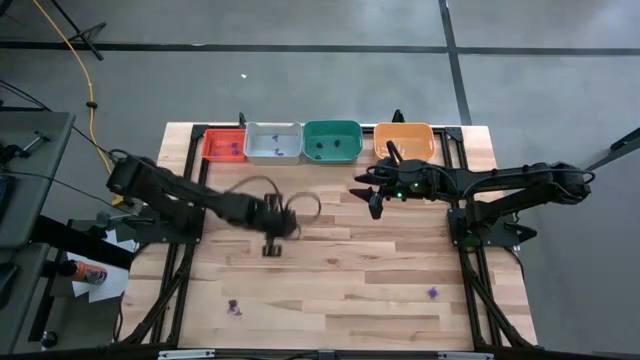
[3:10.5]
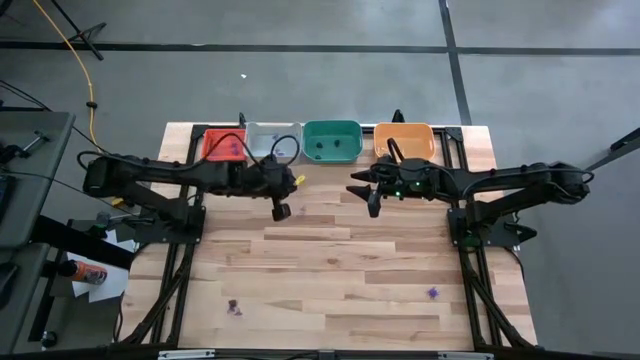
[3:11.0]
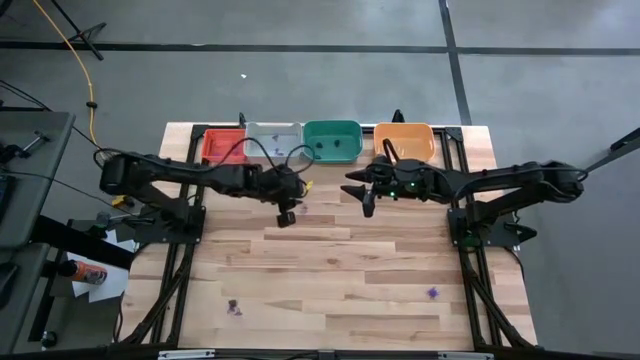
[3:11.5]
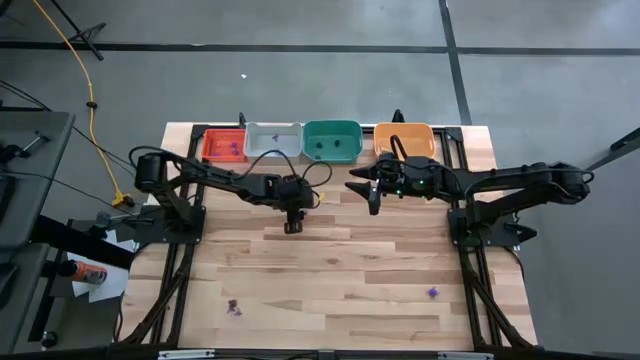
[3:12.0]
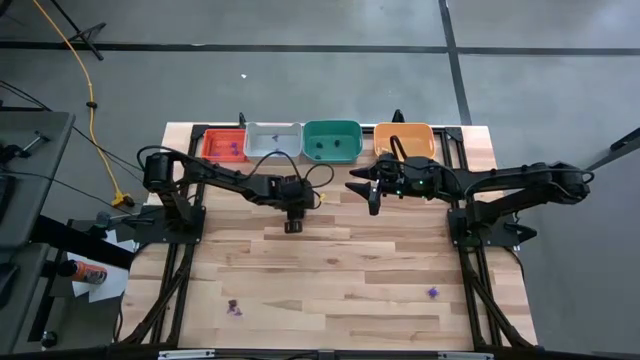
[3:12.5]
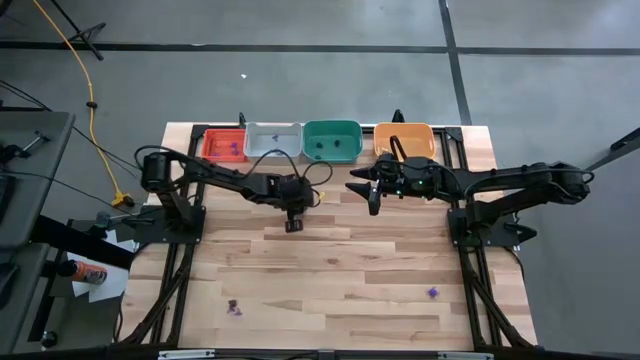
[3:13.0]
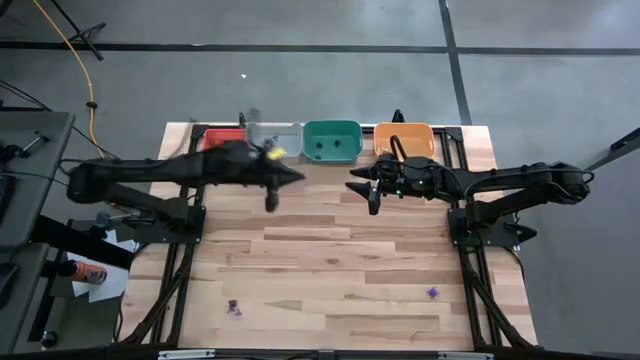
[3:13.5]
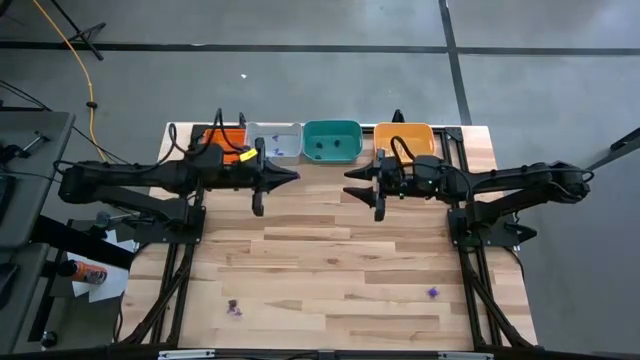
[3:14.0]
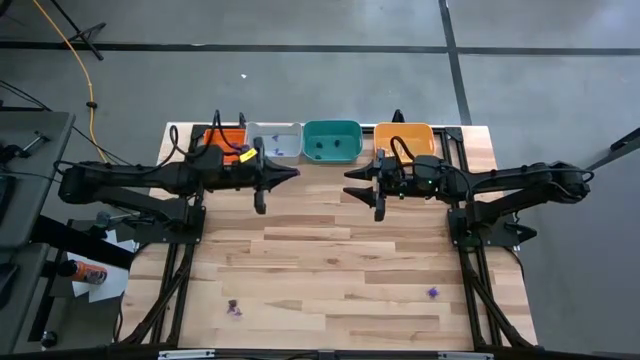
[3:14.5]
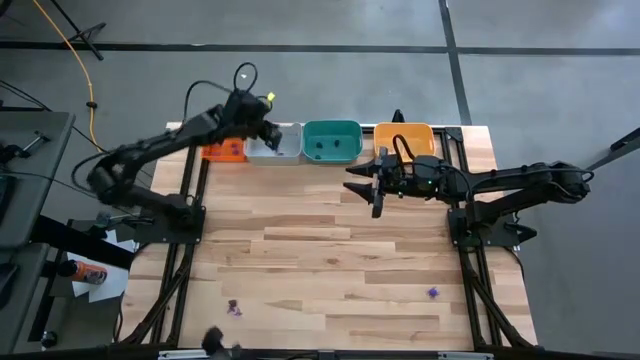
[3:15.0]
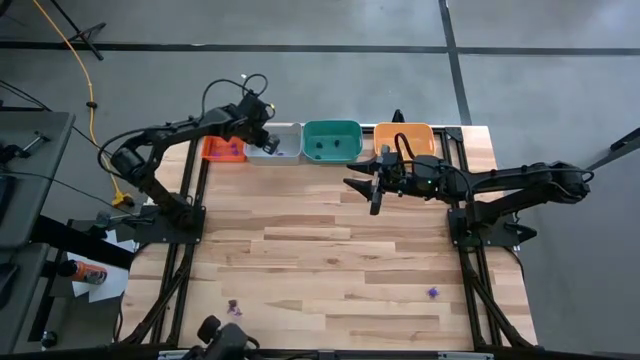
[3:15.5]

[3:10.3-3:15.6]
Task: Sort Halloween decoration
Put the violet witch hat into the gray bin

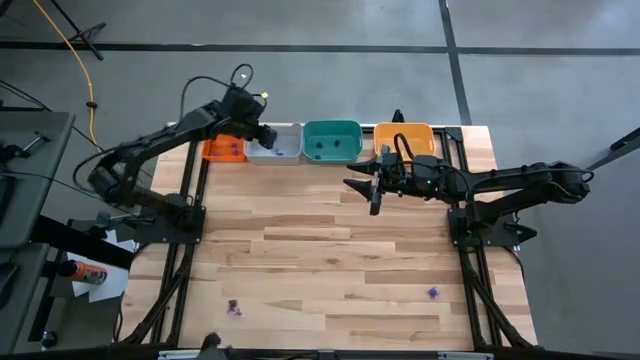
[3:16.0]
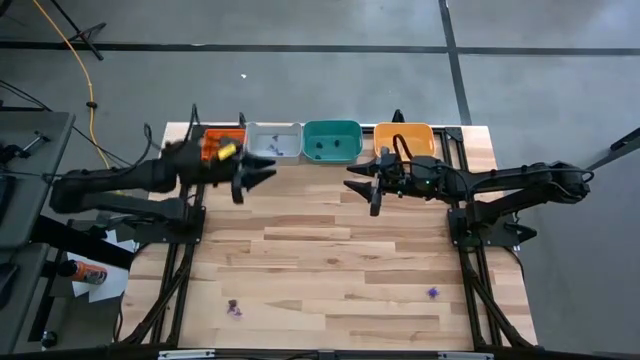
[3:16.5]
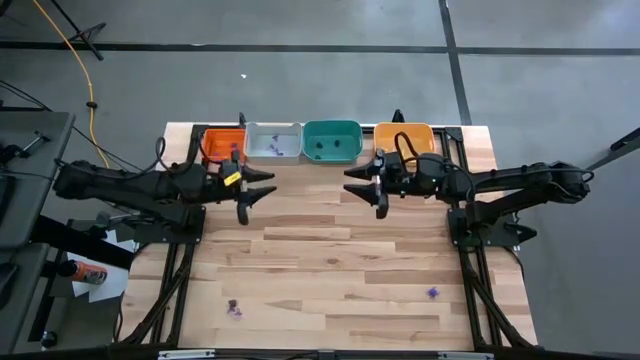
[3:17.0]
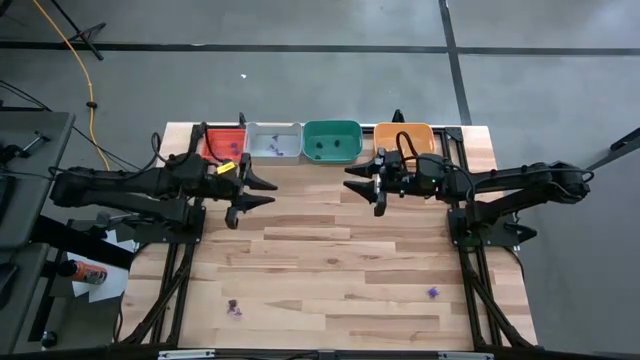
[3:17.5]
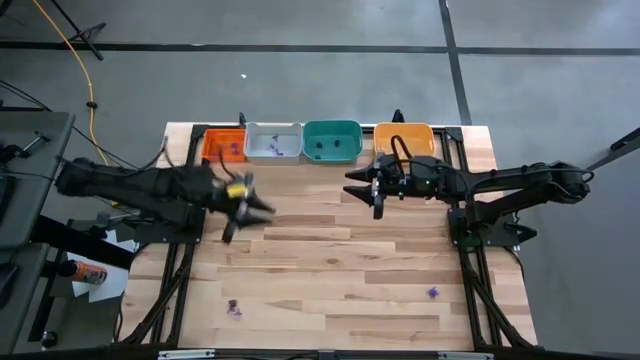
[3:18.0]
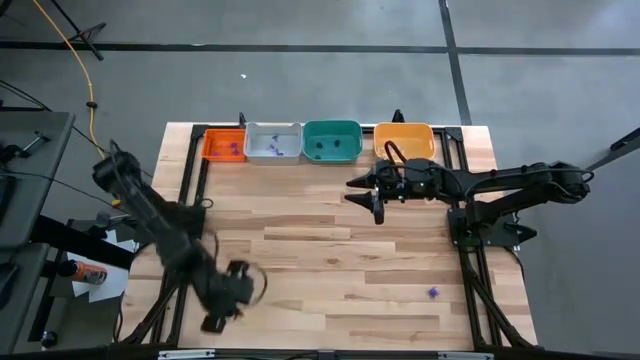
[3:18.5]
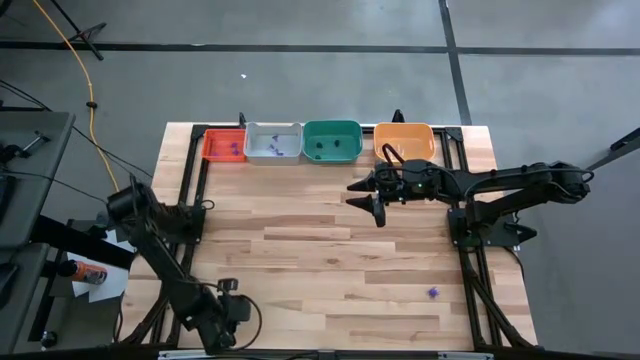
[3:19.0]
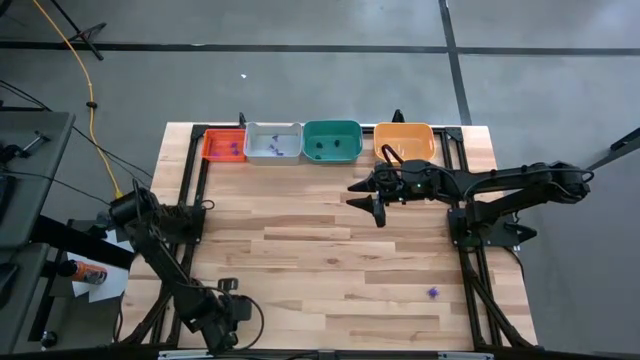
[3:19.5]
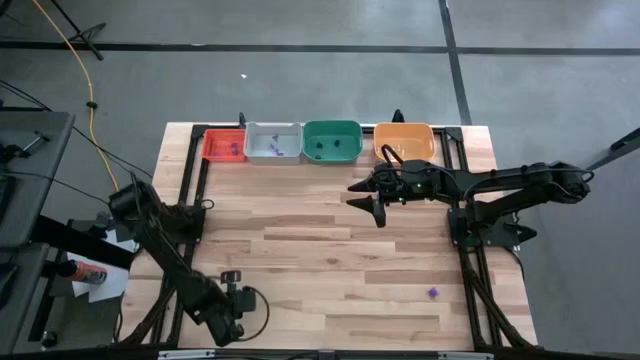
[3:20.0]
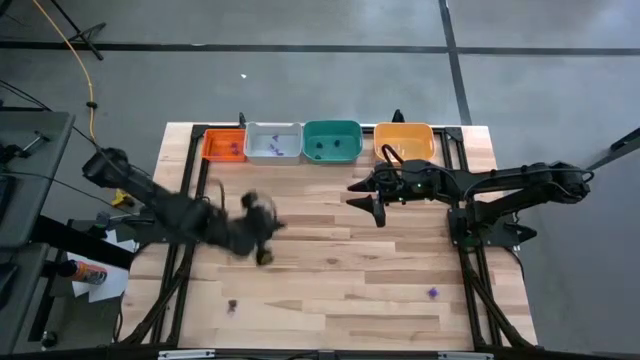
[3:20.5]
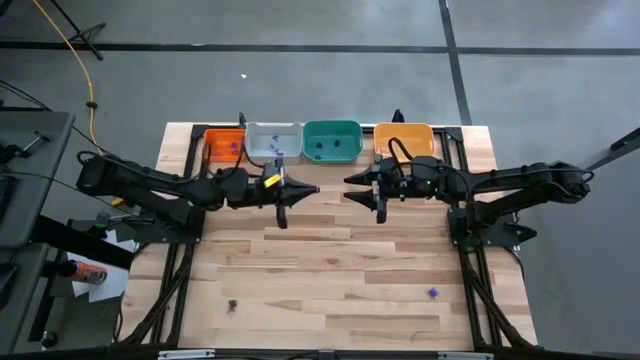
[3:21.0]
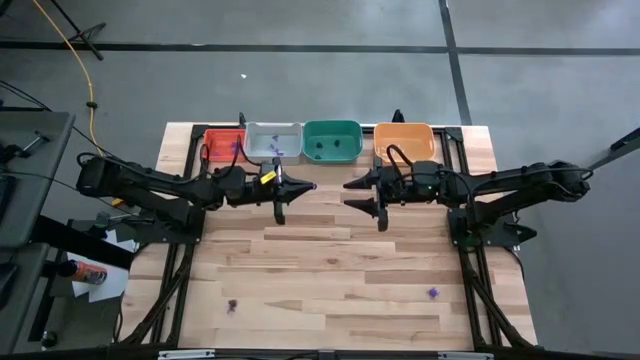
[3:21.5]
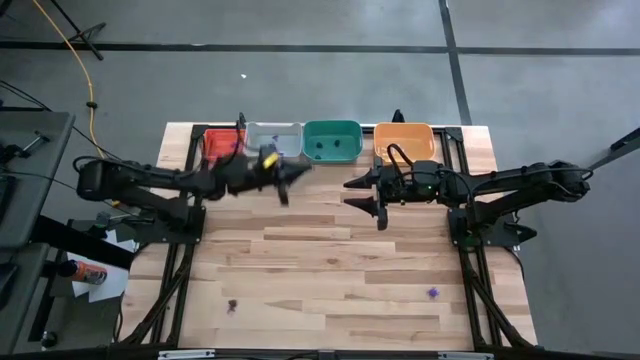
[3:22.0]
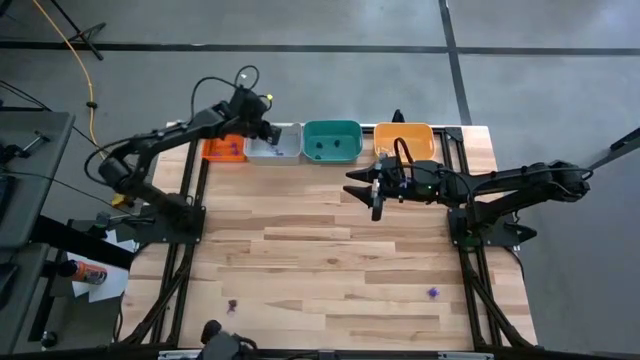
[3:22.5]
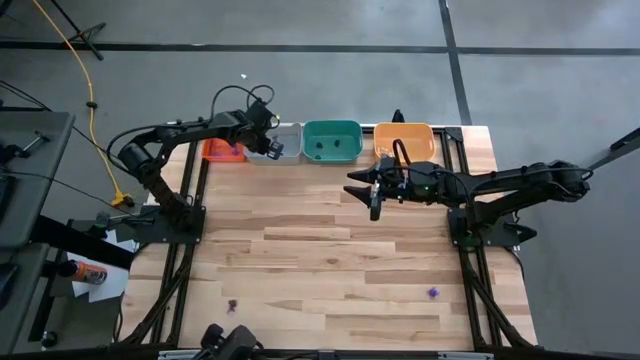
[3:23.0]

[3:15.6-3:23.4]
Put the violet witch hat into the gray bin

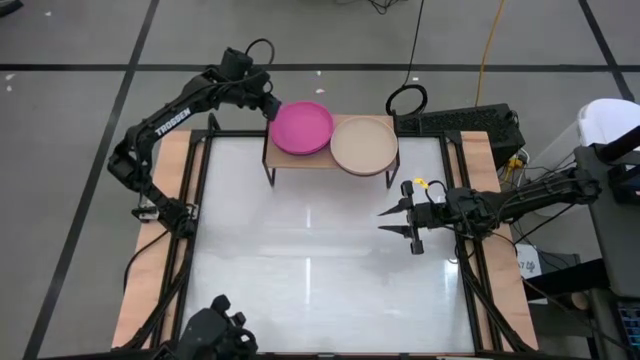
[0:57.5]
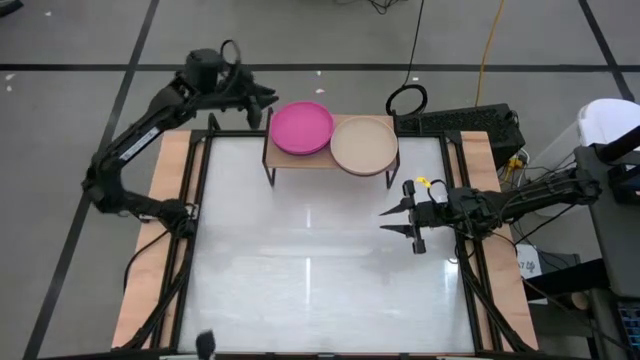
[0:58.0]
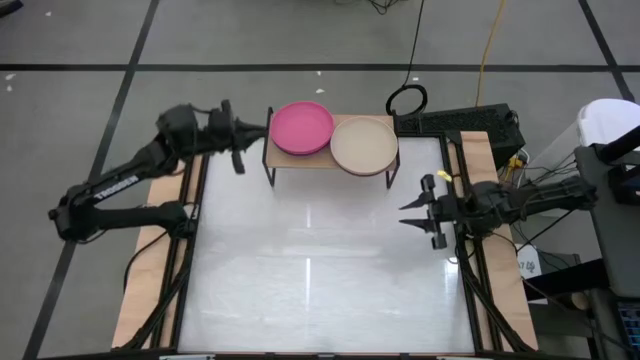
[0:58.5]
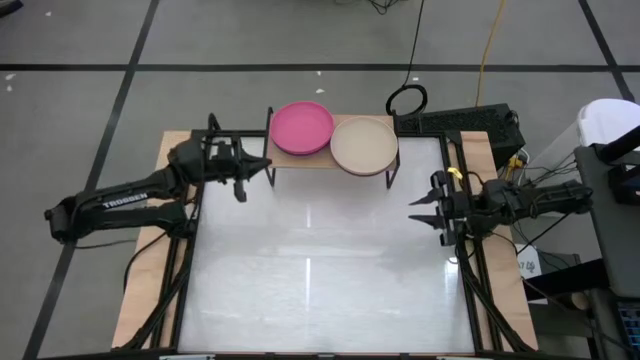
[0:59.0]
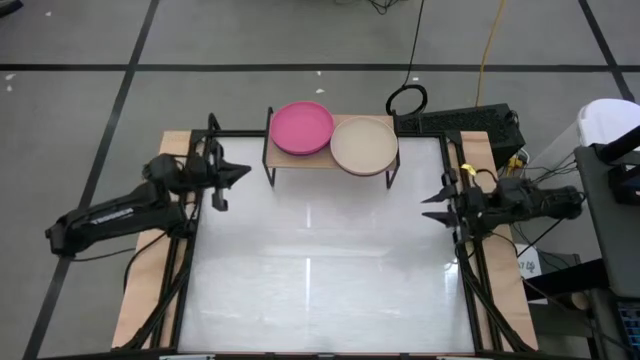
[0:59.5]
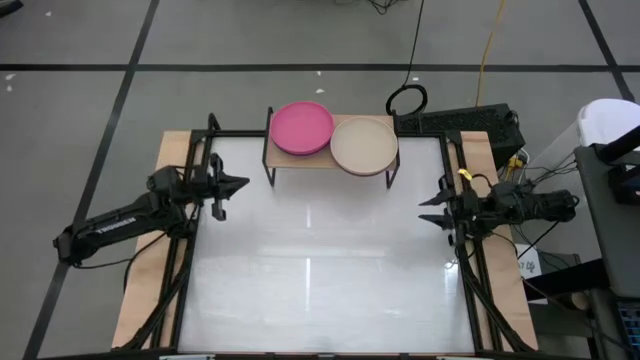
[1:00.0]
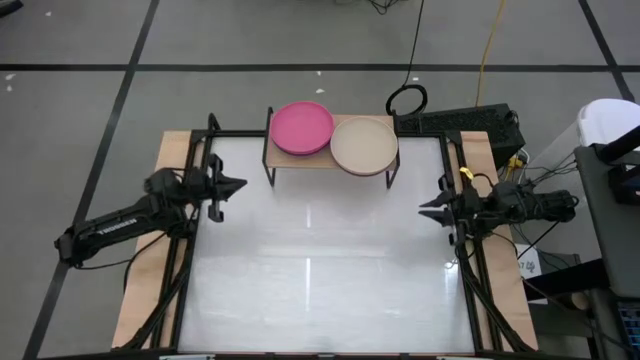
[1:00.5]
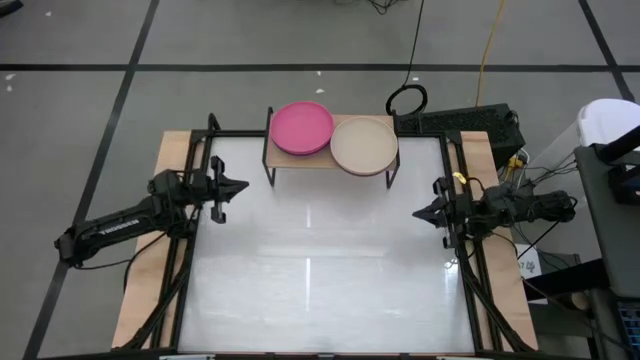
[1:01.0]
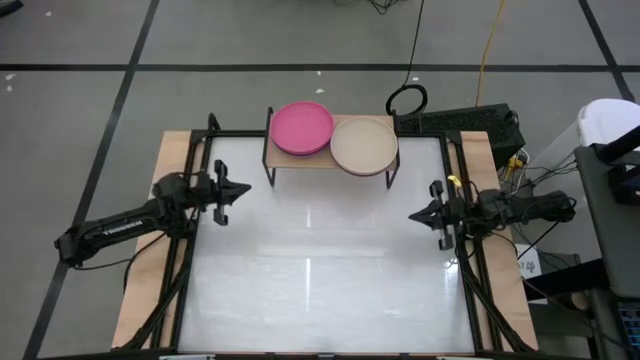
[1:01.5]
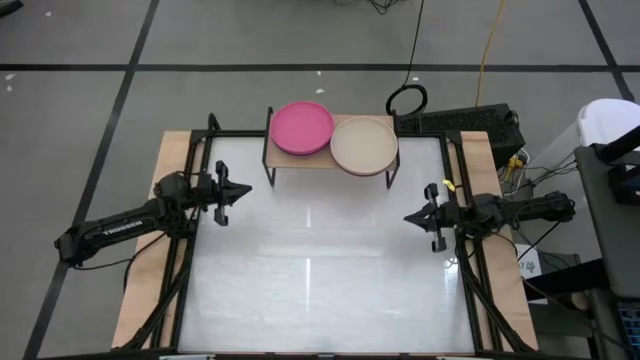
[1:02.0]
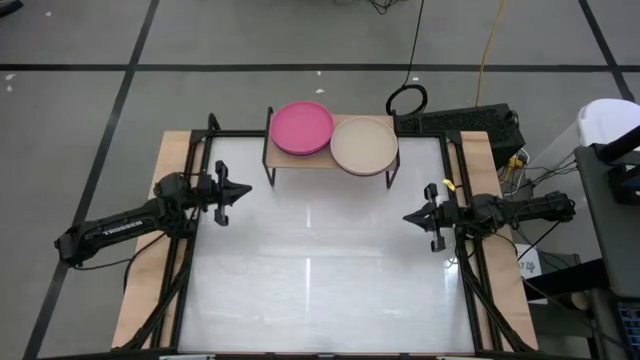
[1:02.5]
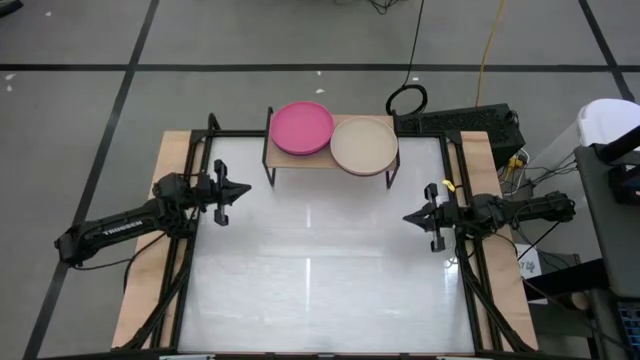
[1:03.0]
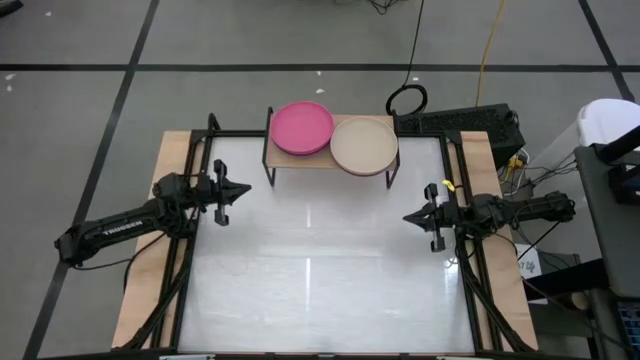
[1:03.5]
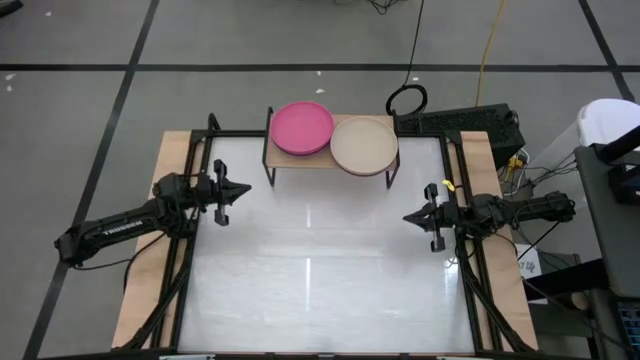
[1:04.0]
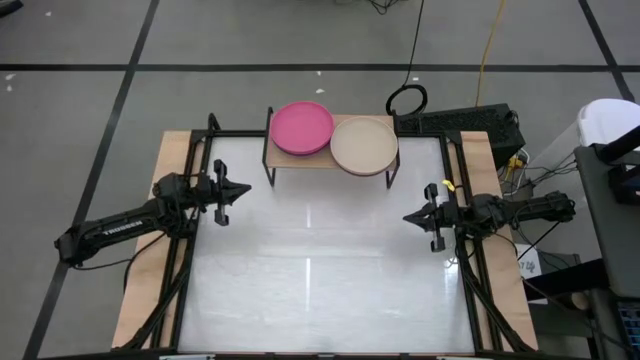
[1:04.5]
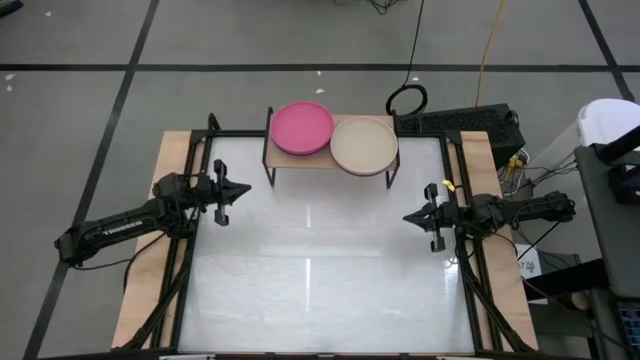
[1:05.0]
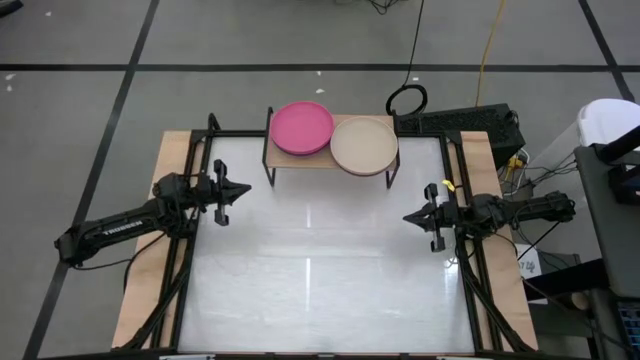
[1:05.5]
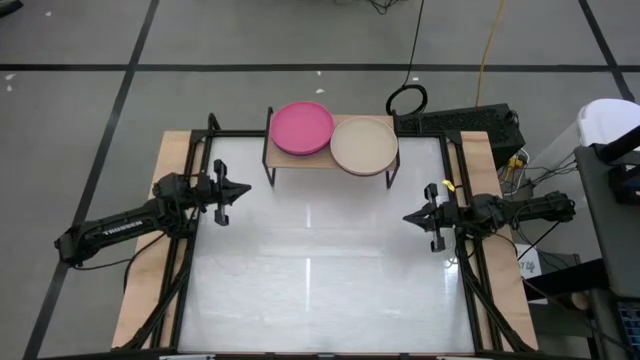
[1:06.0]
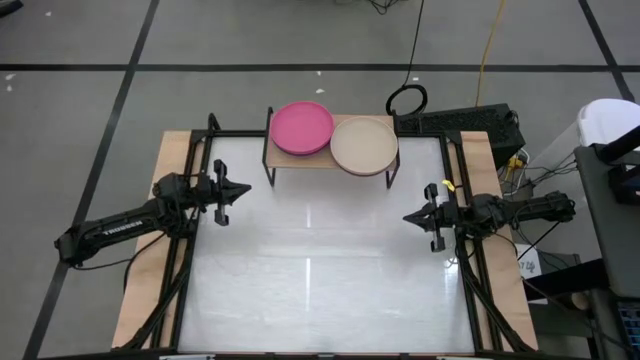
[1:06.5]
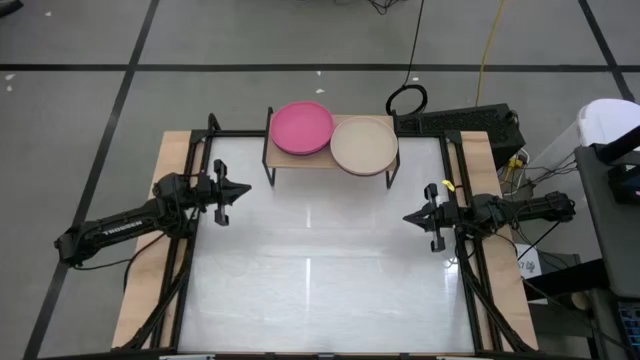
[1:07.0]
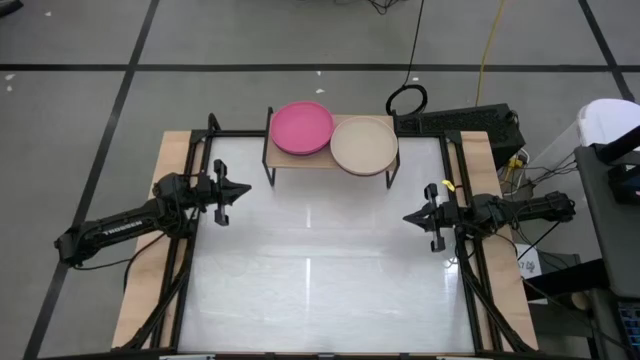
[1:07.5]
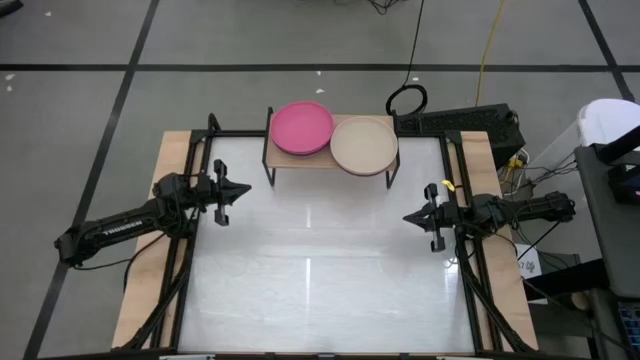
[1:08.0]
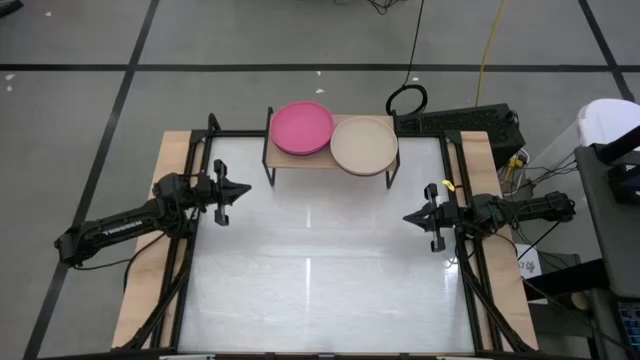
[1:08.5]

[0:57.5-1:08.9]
Task: Place and stack plates onto a shelf
Return to Home Position
